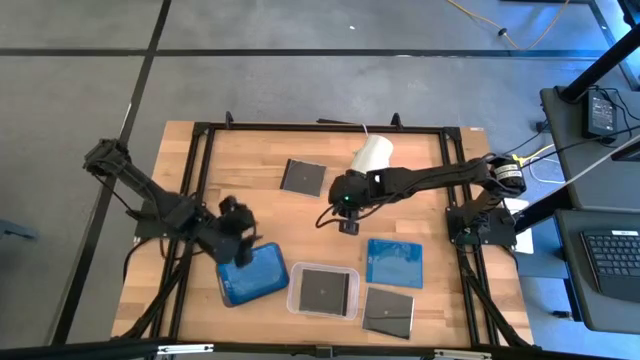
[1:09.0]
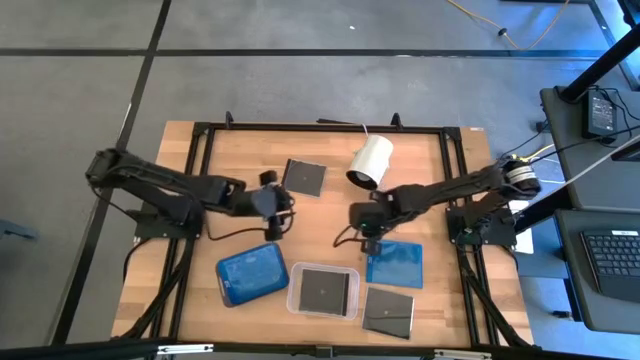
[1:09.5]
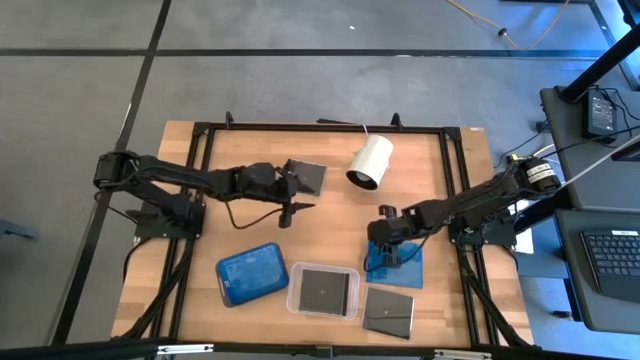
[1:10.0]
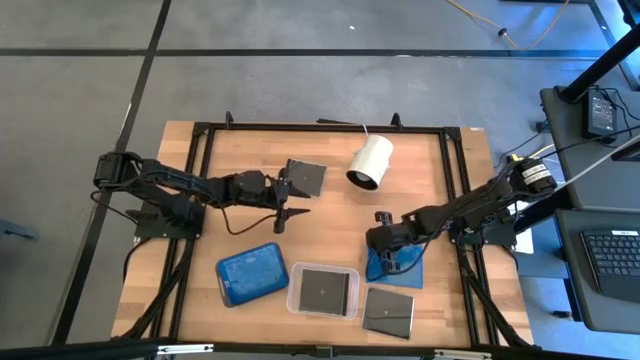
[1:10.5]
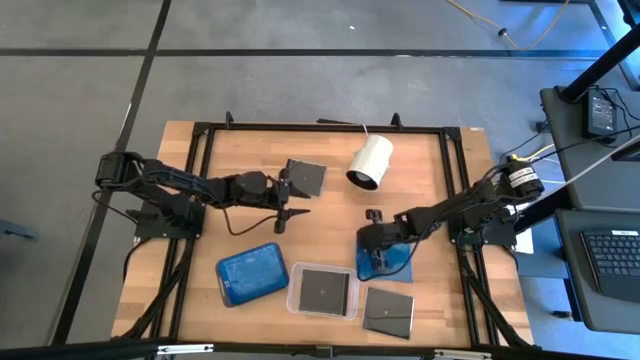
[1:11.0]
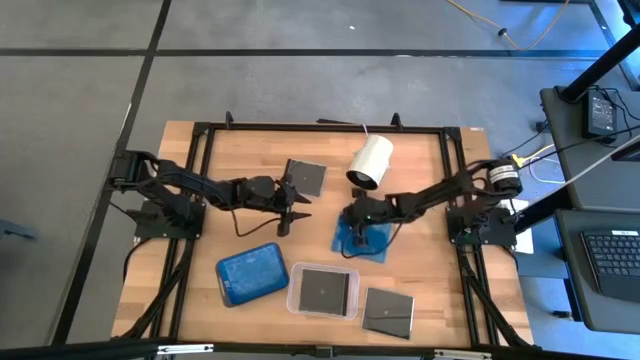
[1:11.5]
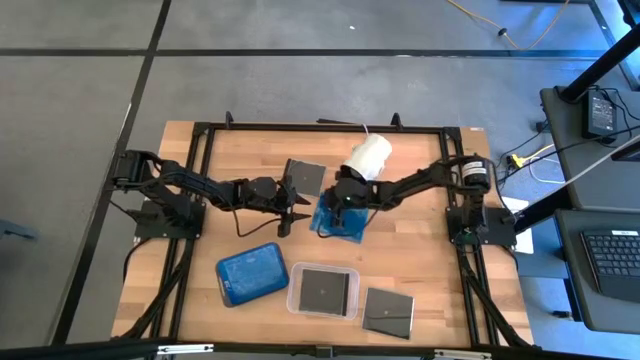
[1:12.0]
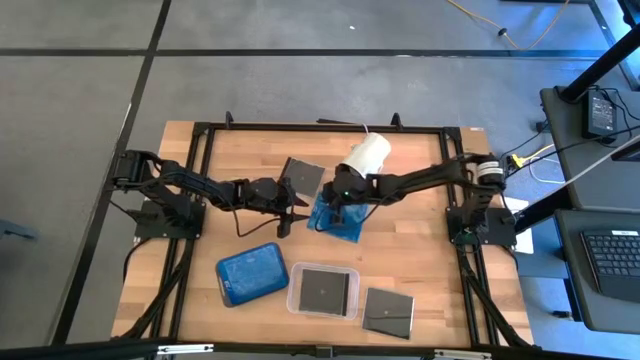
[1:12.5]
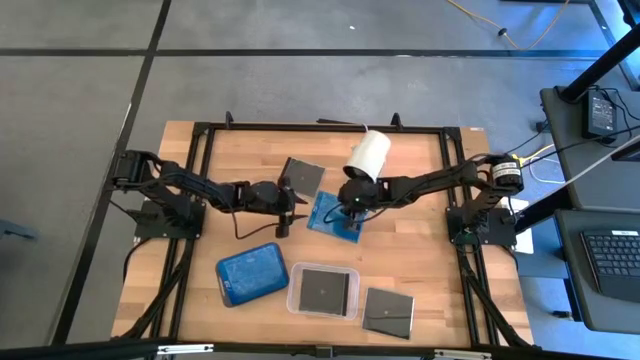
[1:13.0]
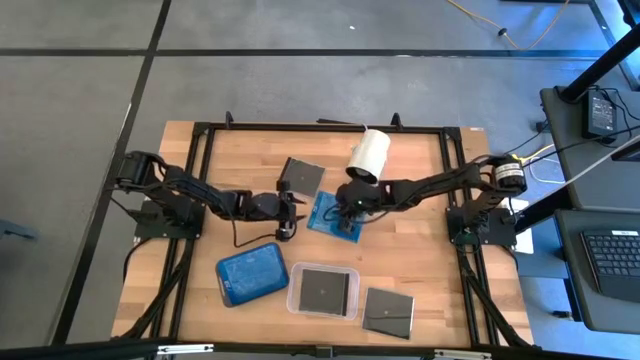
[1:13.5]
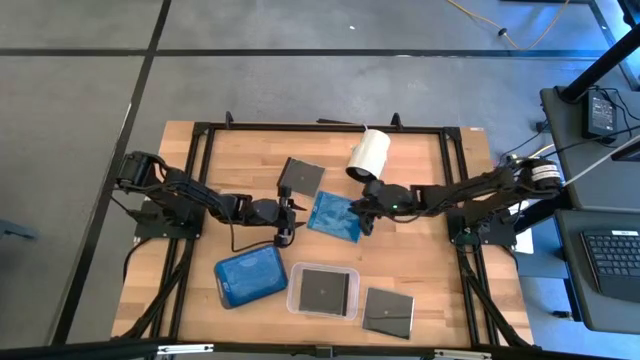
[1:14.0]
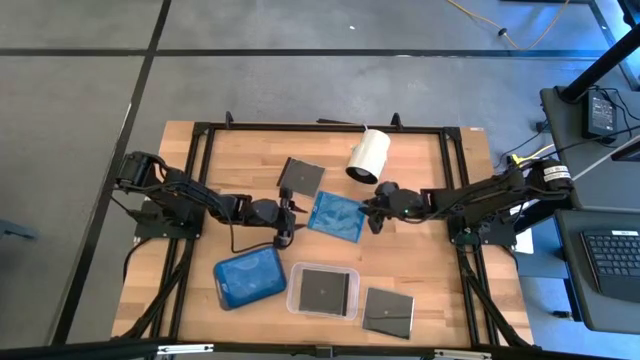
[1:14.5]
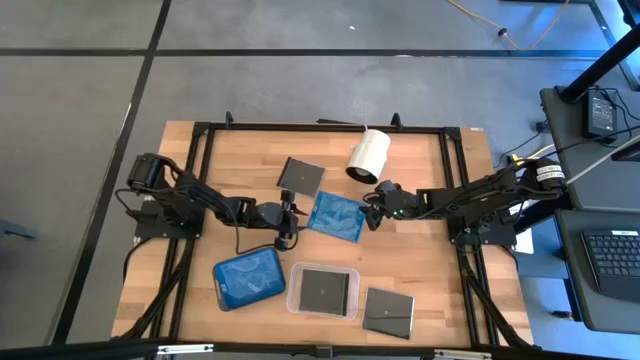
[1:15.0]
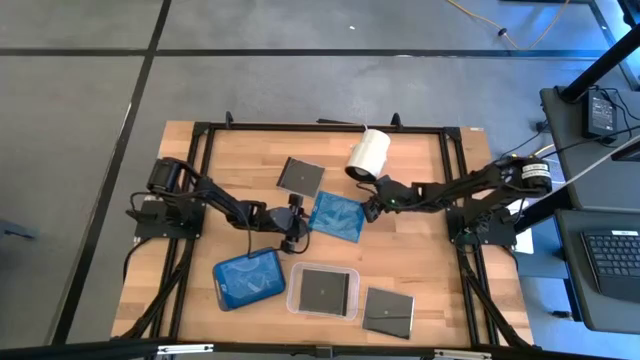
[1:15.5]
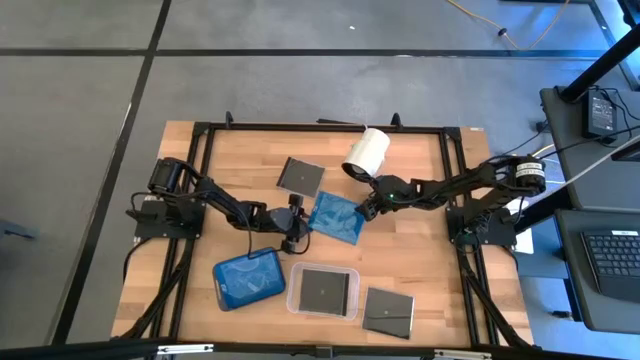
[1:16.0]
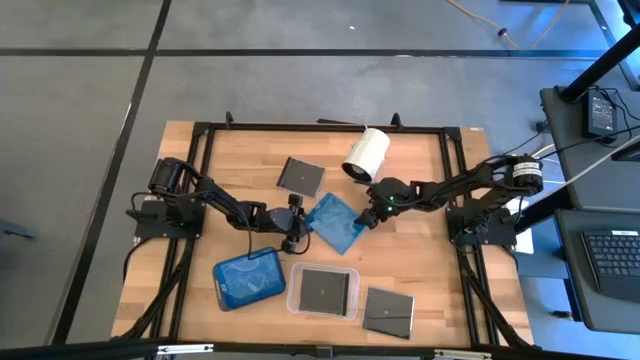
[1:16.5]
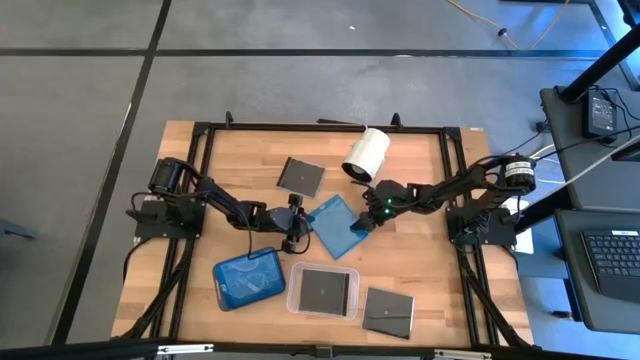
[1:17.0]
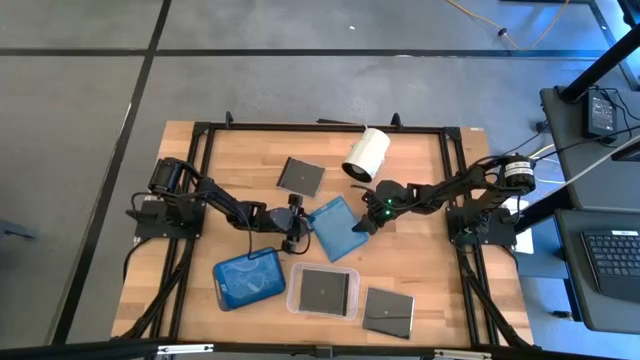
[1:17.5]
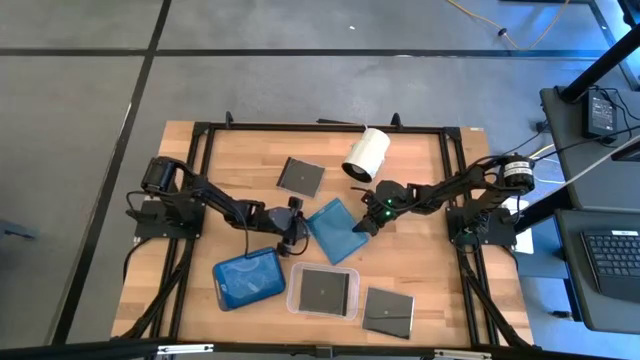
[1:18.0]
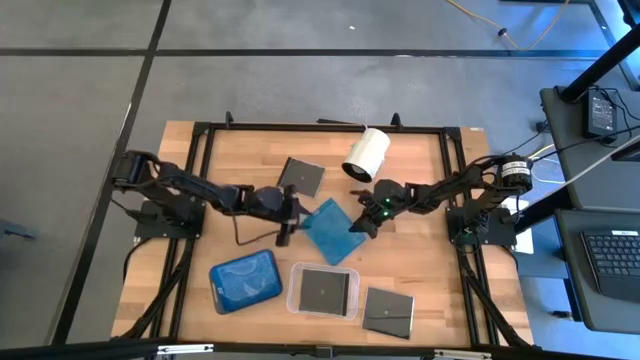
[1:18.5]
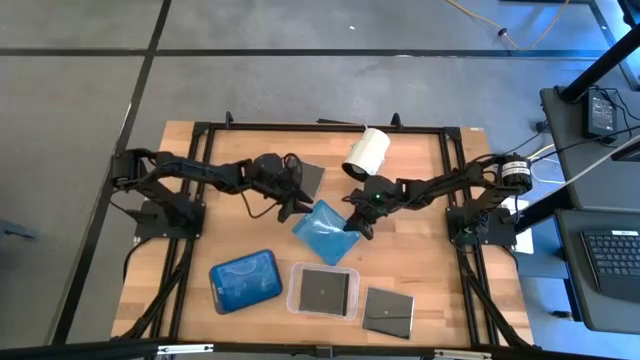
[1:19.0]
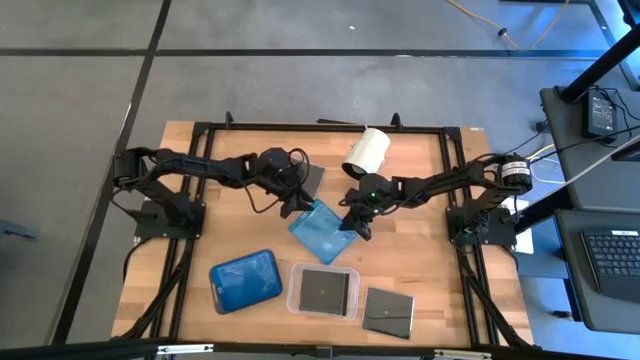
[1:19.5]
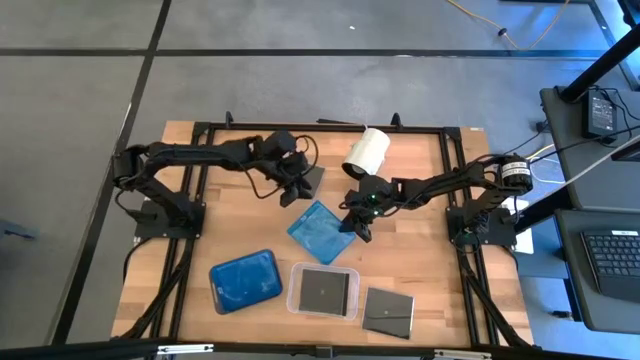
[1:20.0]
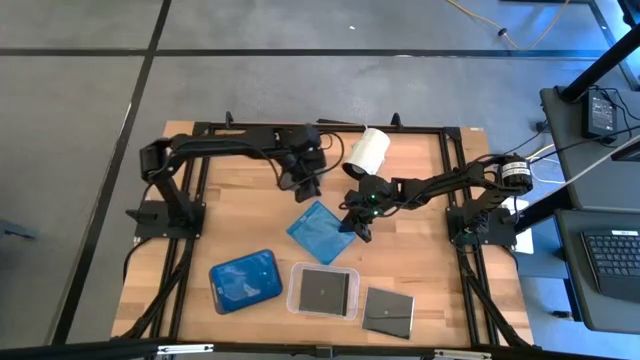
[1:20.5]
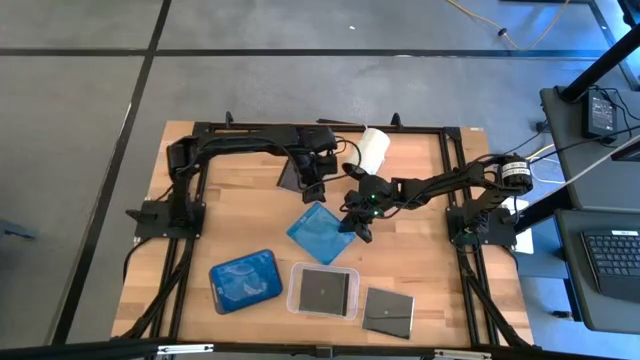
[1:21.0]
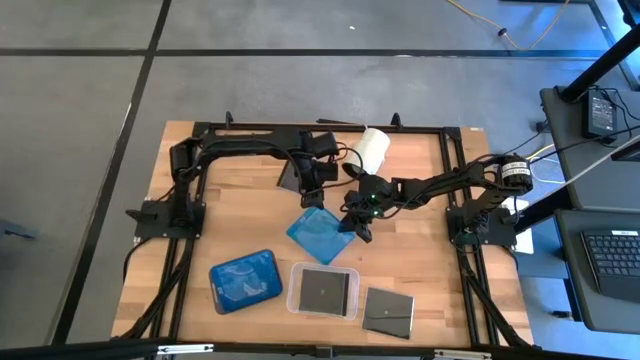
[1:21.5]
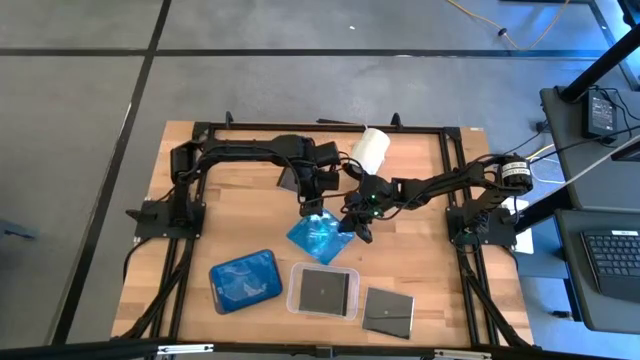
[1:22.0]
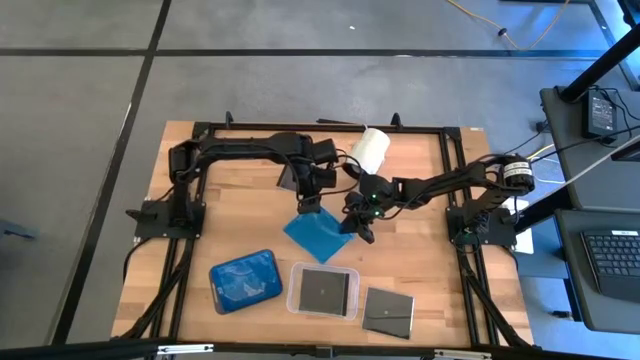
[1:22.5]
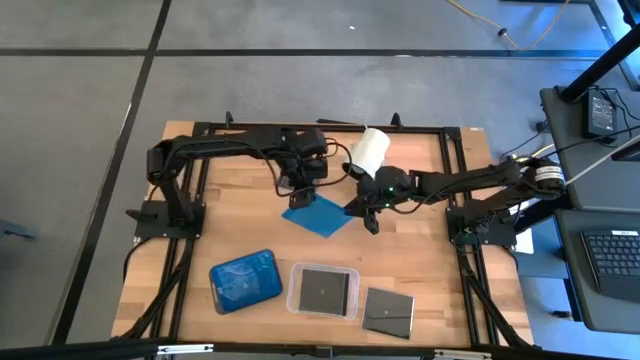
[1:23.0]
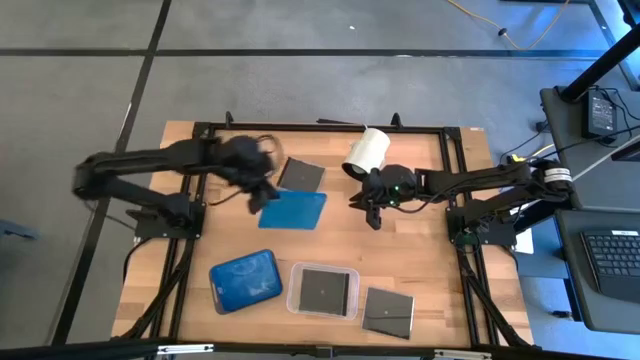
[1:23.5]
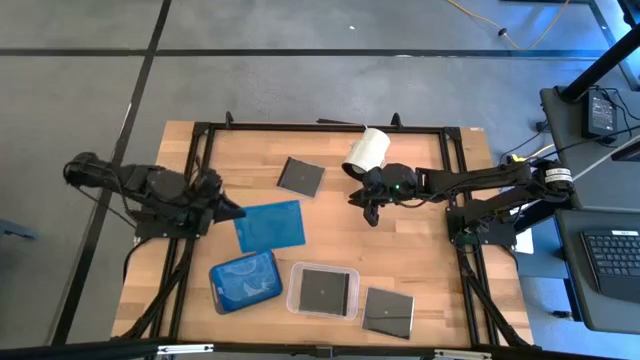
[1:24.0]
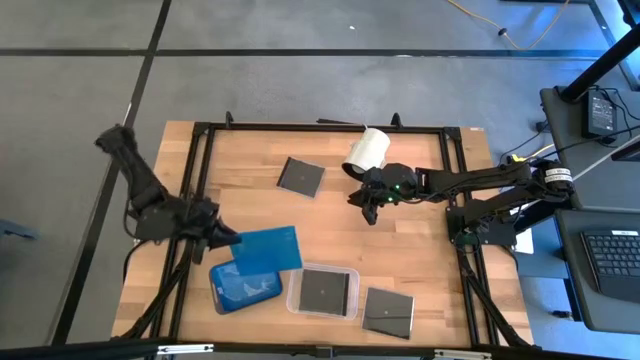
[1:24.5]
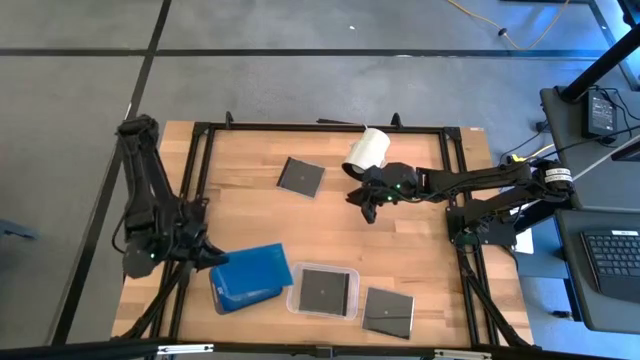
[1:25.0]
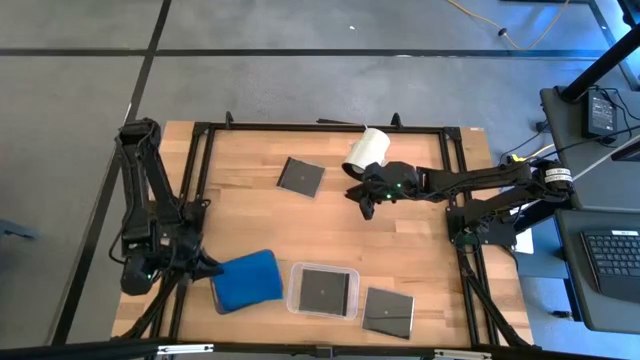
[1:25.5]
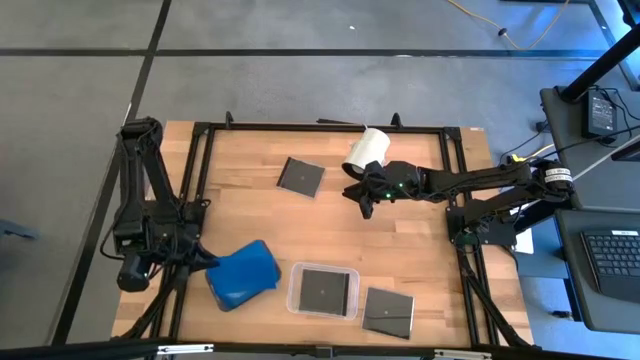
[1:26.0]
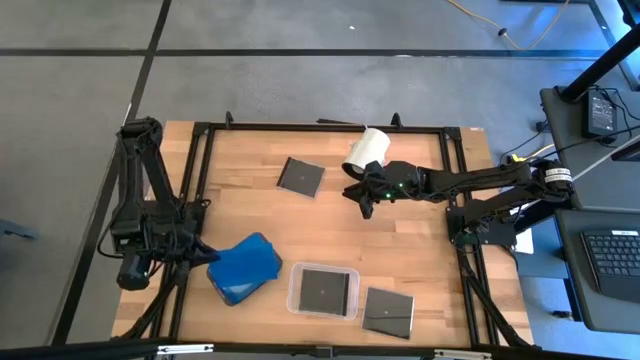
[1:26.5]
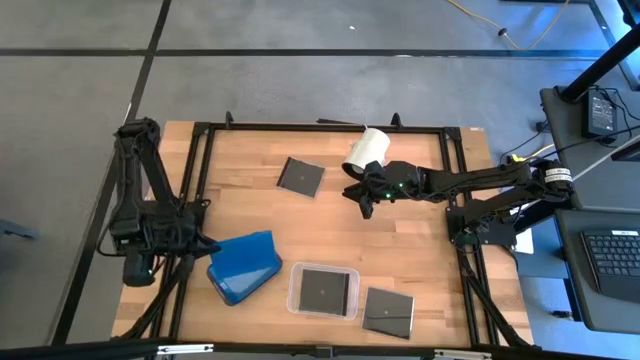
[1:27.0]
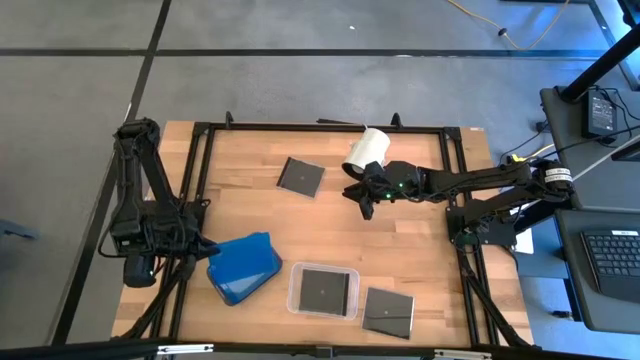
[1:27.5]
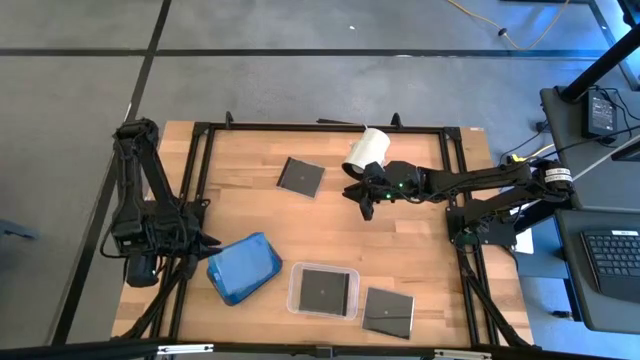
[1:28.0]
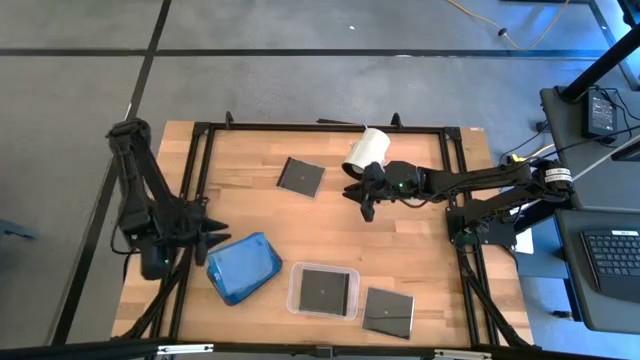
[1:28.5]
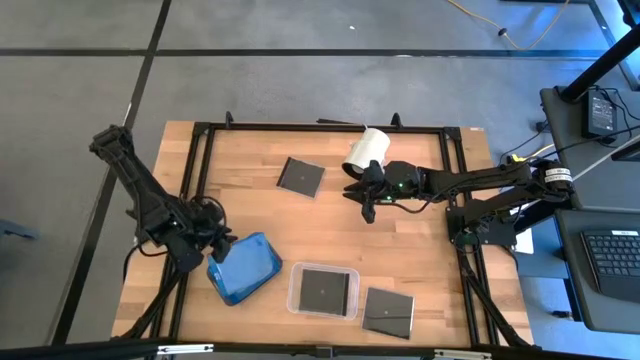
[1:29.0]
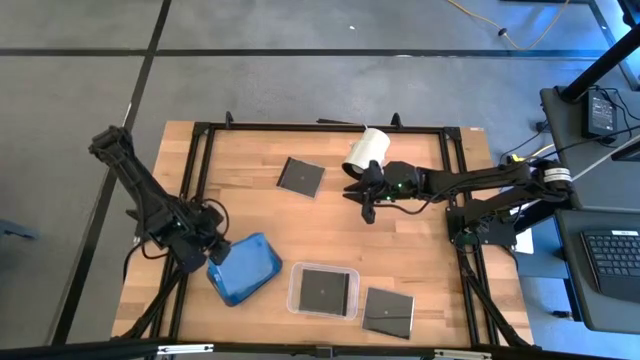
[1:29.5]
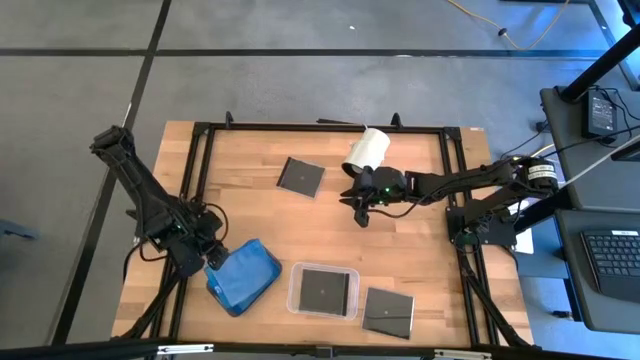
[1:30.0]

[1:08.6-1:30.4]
Task: Pick & place jewel cases by type
Put the blue CD case into the black bin

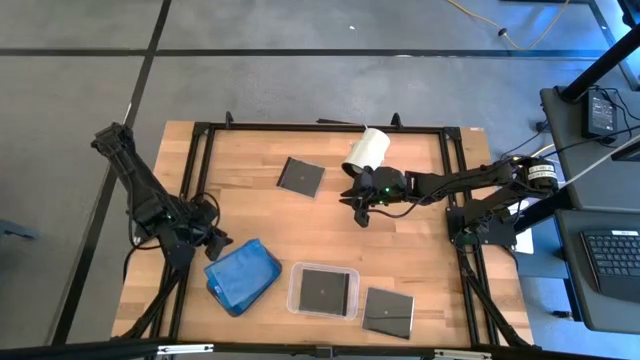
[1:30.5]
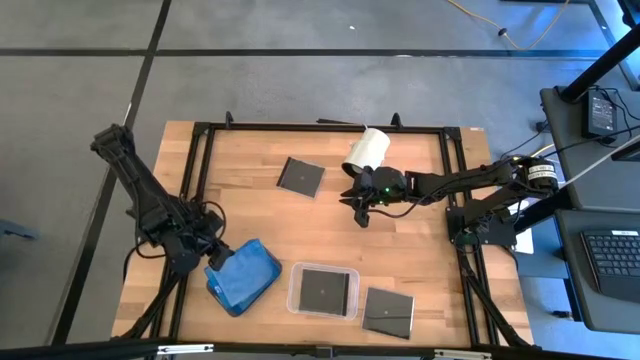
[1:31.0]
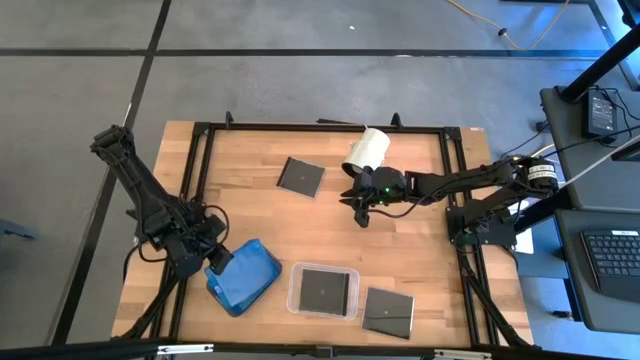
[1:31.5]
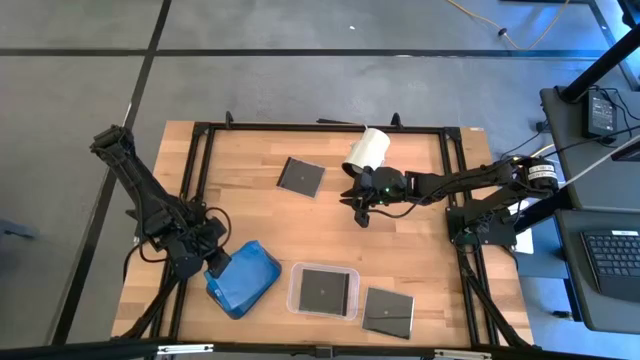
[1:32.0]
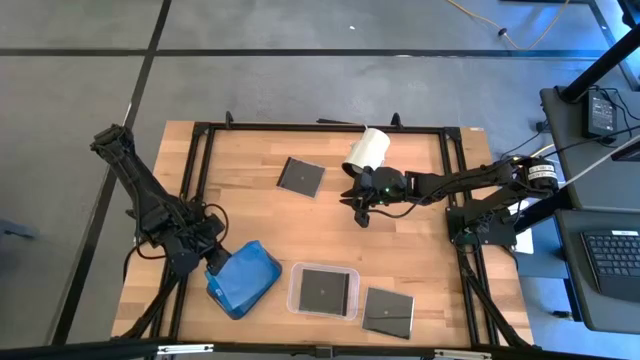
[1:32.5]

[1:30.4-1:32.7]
Put the blue CD case into the black bin
